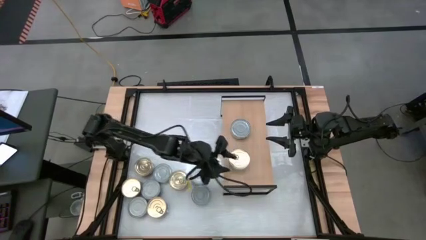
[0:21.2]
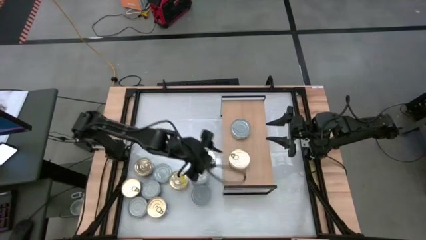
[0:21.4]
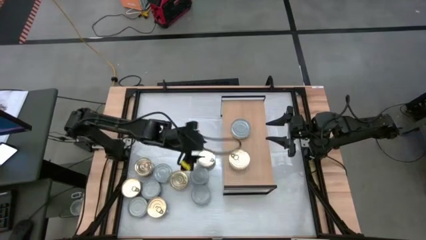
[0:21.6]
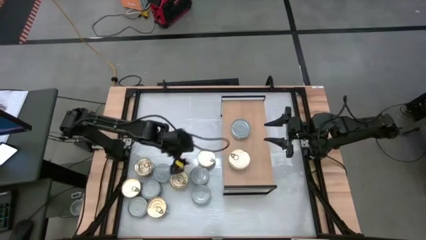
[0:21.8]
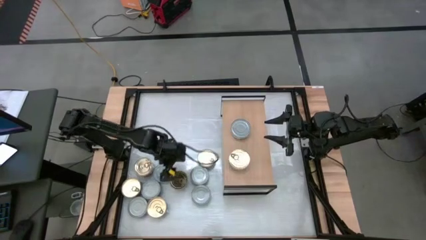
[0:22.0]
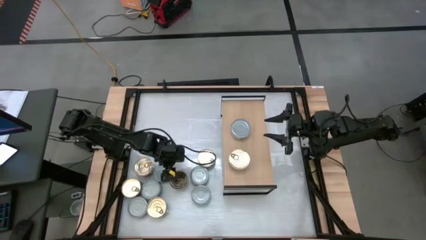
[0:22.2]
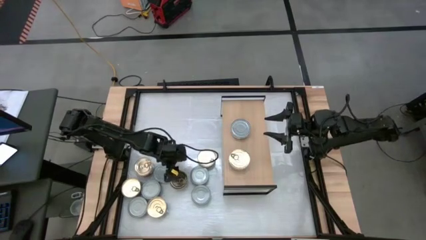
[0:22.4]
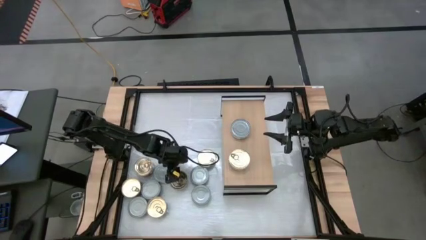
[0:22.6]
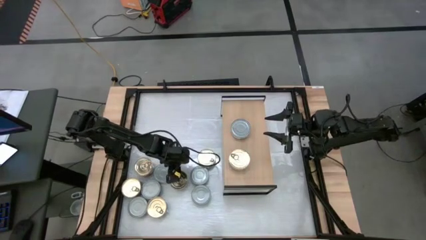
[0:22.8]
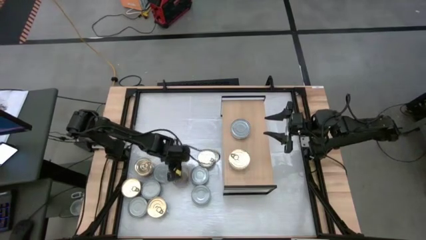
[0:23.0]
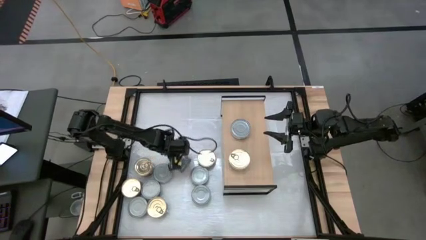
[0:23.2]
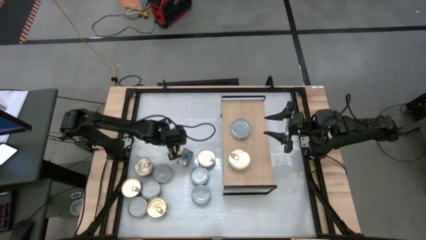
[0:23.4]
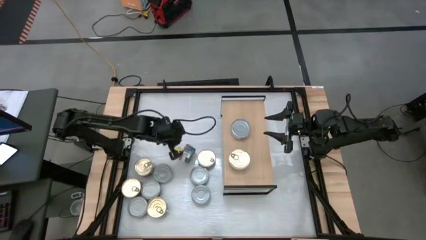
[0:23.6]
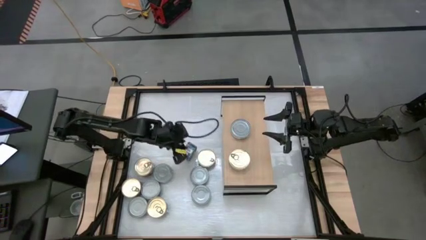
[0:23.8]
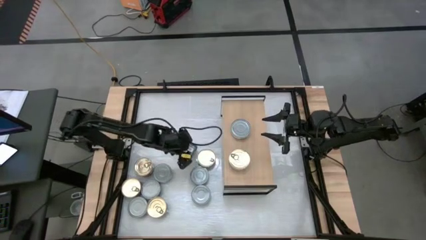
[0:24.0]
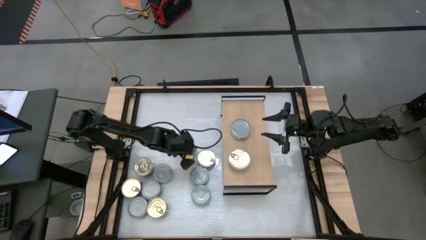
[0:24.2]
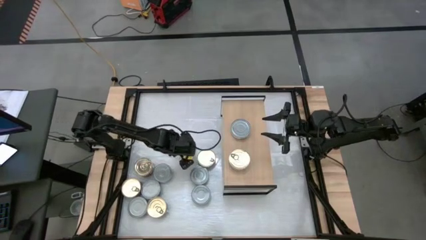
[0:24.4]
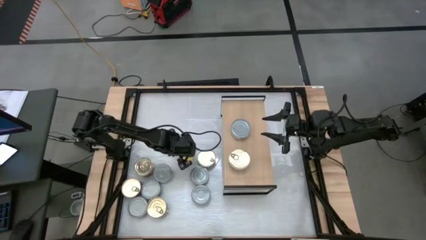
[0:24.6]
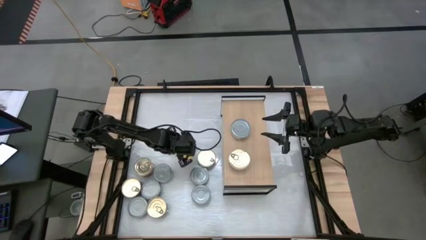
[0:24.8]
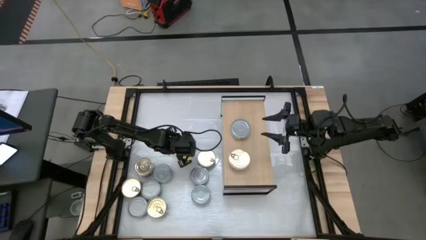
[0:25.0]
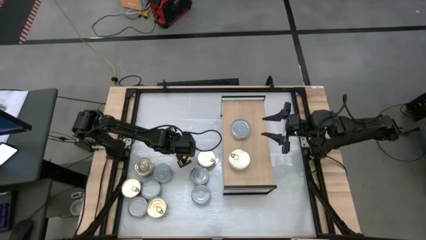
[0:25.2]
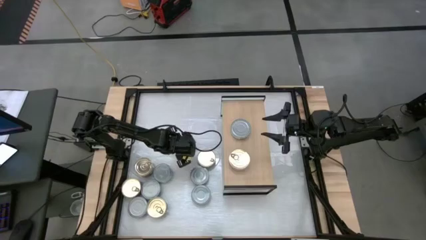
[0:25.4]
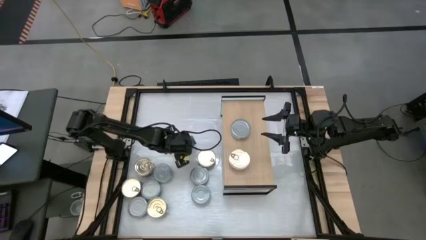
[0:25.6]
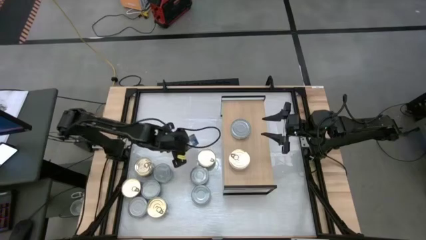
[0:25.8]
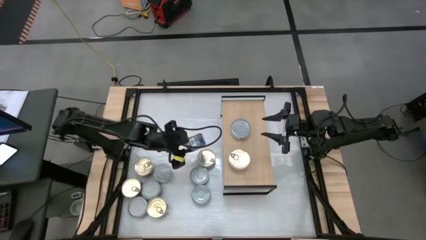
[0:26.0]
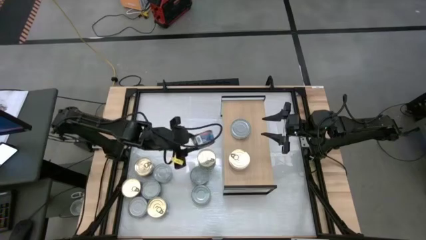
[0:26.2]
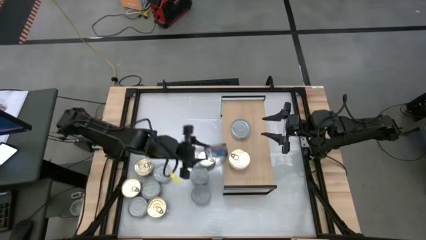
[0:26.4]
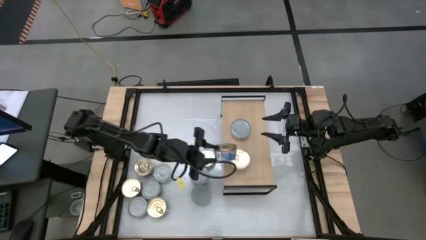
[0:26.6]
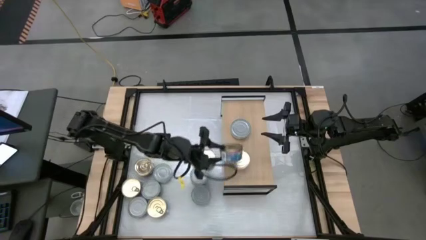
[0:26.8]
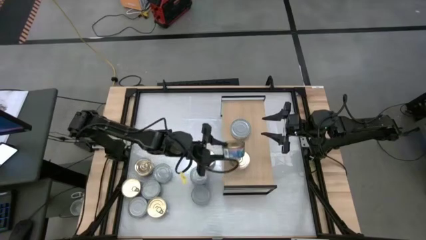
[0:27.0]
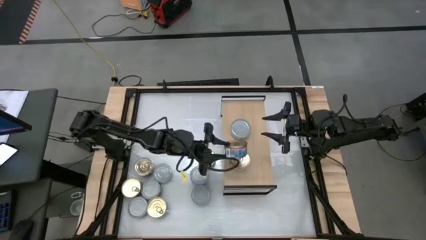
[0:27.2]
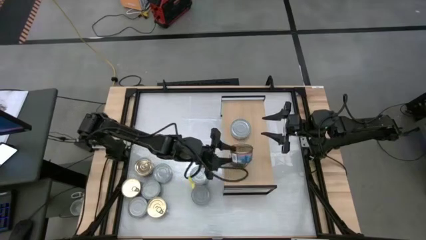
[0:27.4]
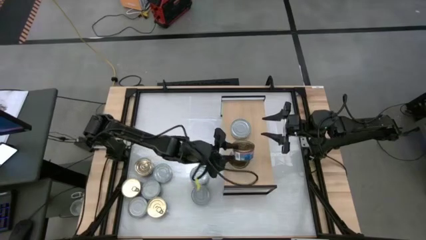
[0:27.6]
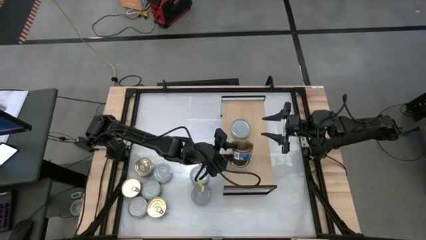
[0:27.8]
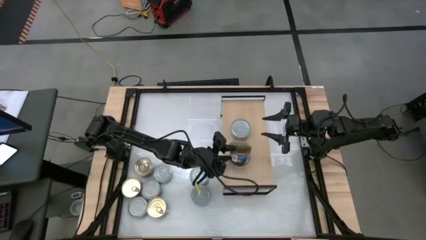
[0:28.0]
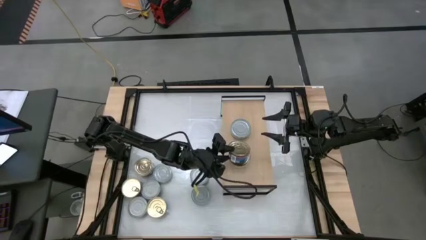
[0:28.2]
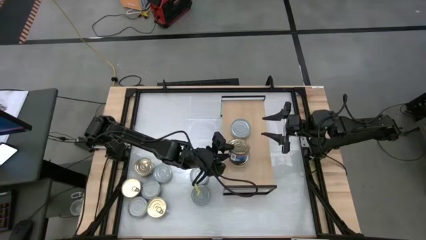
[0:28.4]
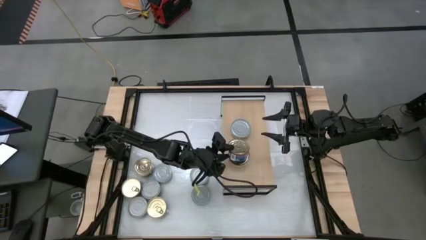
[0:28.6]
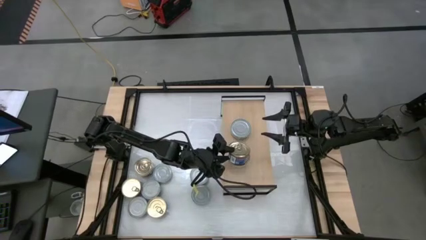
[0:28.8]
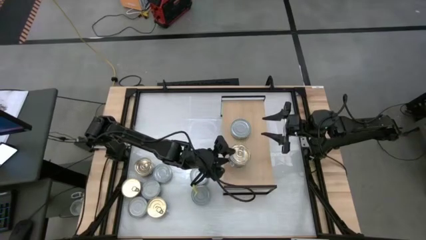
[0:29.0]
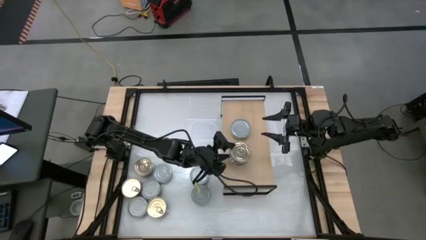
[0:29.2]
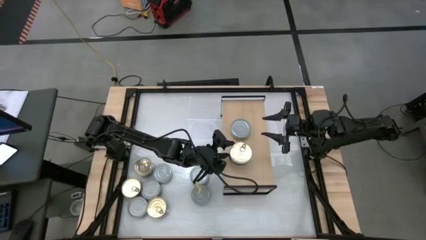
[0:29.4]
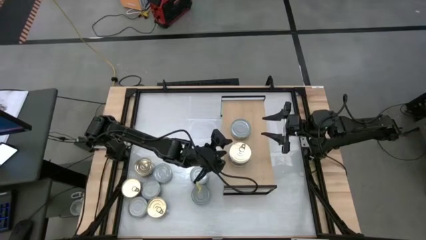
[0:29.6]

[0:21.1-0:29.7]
Task: Stack canned seafood by type on shelf
Stack the blue tuna can on top of the blue tuna can

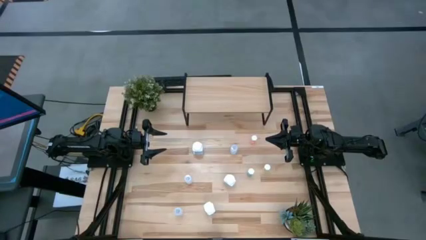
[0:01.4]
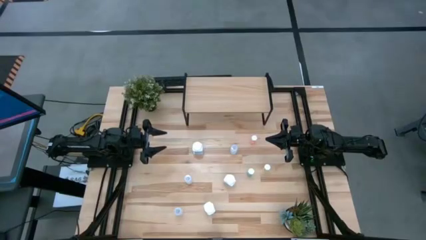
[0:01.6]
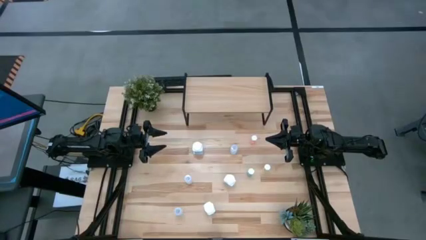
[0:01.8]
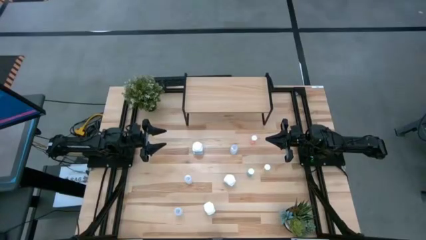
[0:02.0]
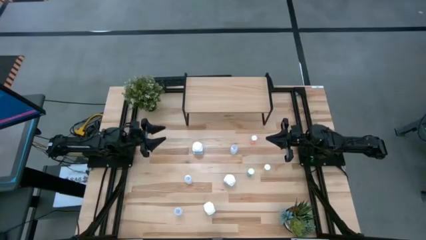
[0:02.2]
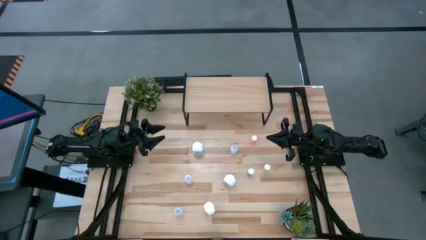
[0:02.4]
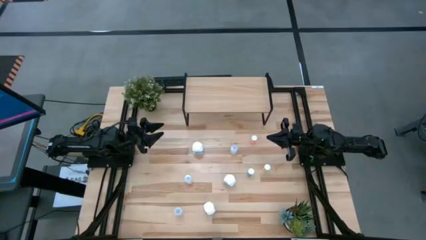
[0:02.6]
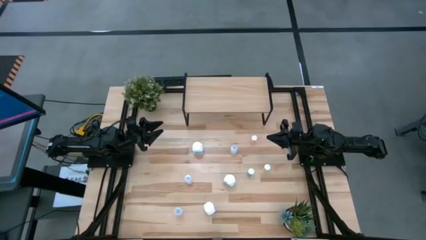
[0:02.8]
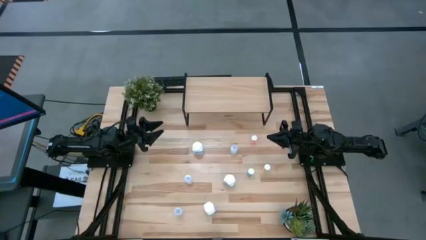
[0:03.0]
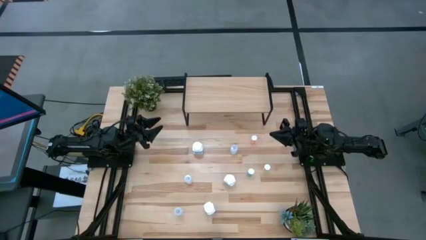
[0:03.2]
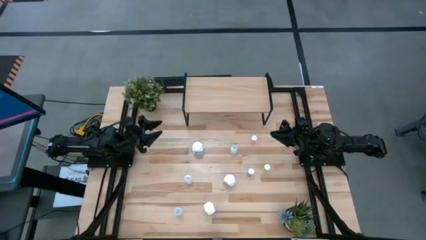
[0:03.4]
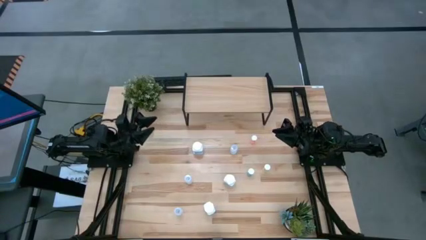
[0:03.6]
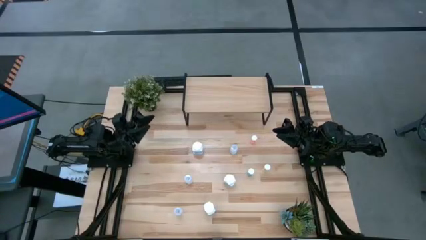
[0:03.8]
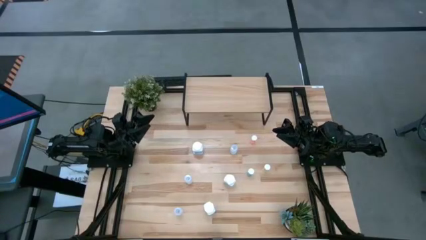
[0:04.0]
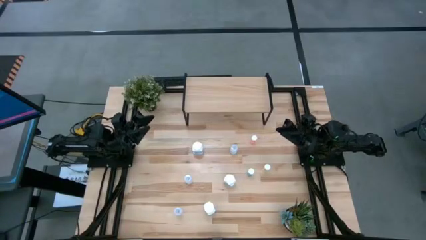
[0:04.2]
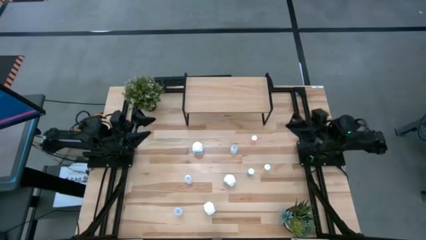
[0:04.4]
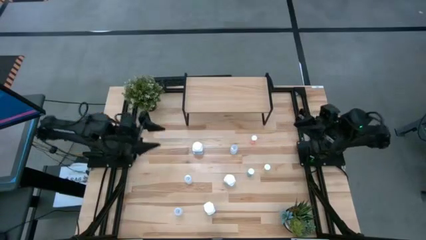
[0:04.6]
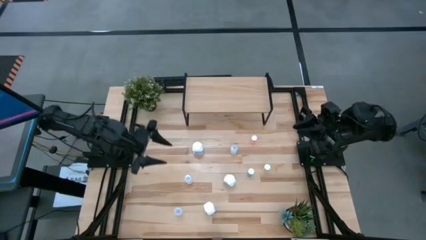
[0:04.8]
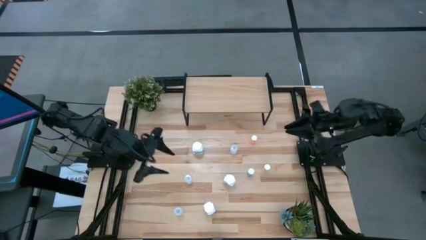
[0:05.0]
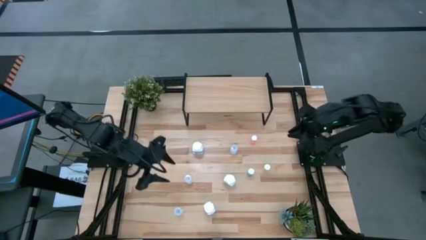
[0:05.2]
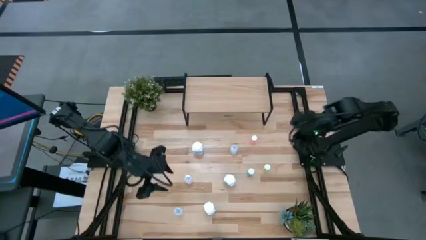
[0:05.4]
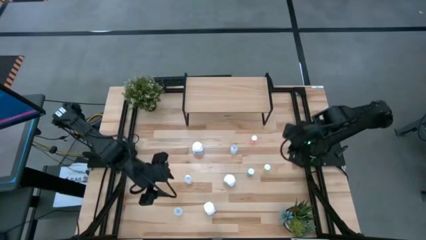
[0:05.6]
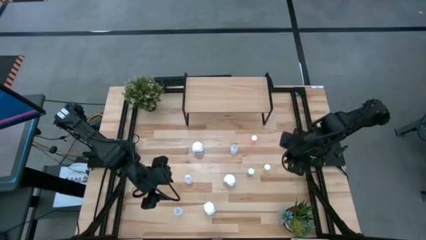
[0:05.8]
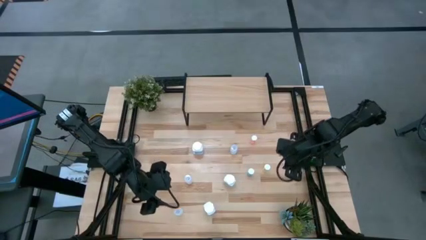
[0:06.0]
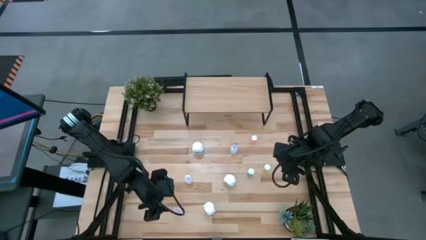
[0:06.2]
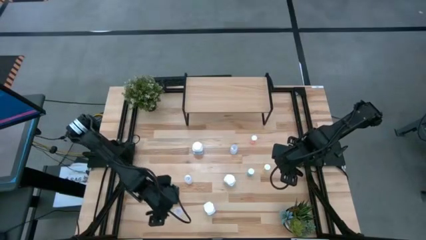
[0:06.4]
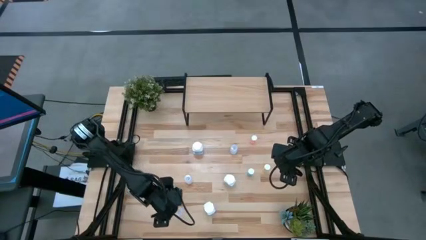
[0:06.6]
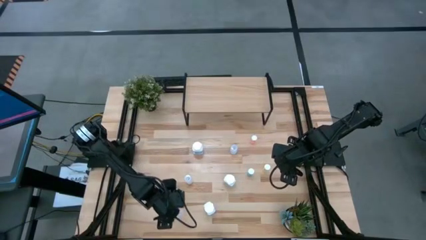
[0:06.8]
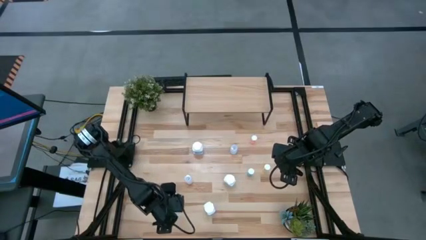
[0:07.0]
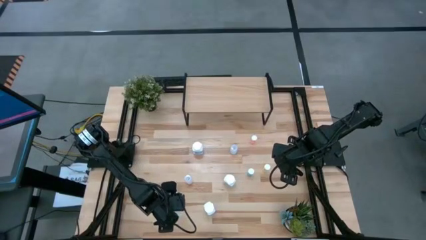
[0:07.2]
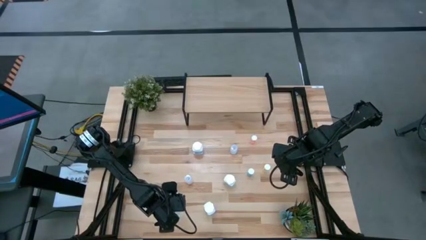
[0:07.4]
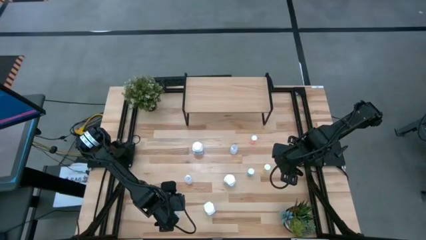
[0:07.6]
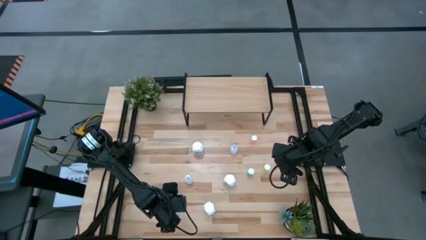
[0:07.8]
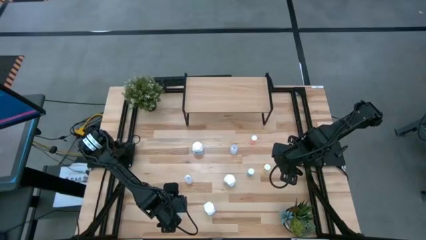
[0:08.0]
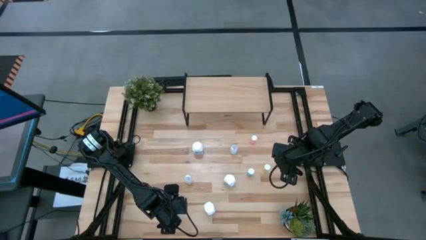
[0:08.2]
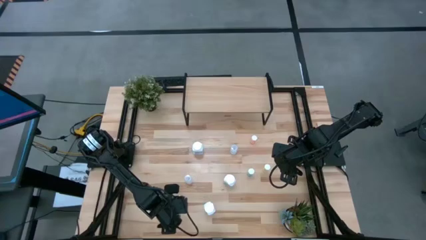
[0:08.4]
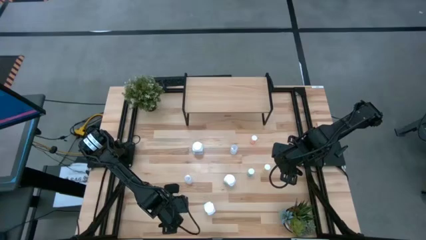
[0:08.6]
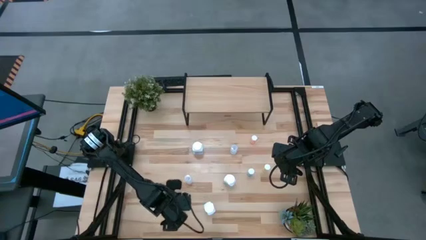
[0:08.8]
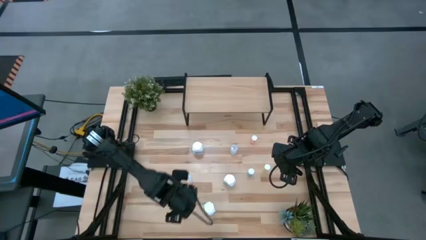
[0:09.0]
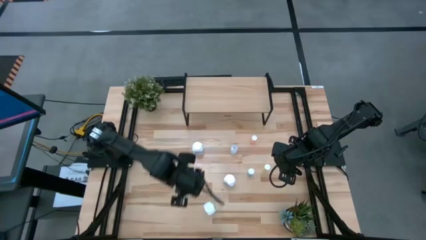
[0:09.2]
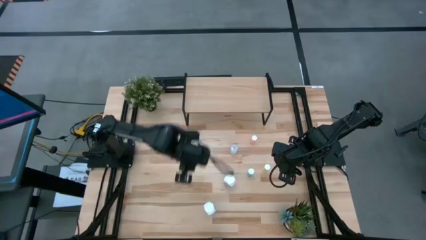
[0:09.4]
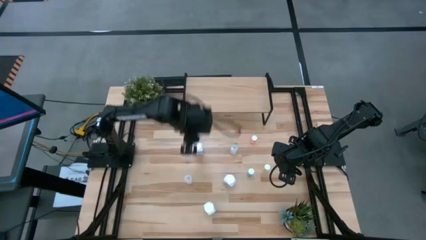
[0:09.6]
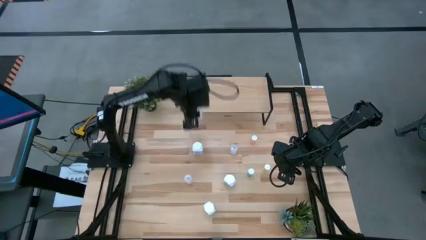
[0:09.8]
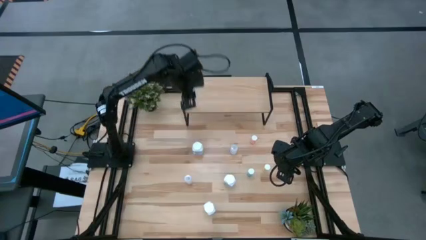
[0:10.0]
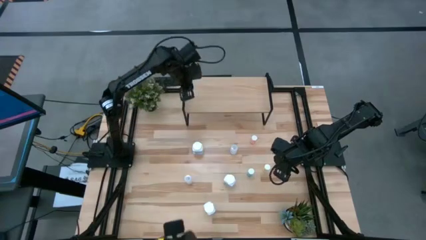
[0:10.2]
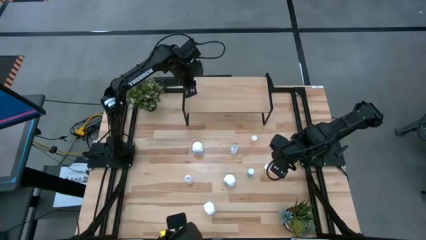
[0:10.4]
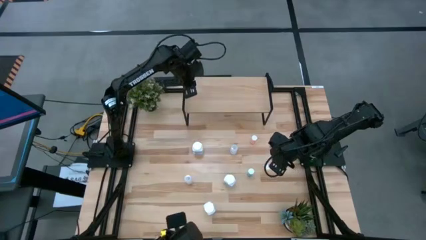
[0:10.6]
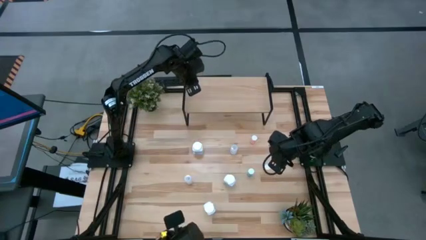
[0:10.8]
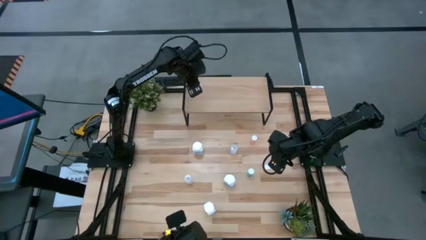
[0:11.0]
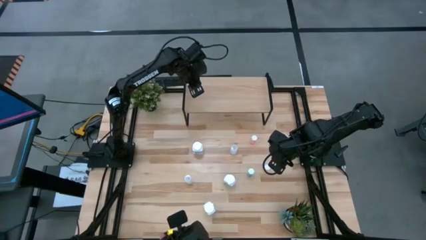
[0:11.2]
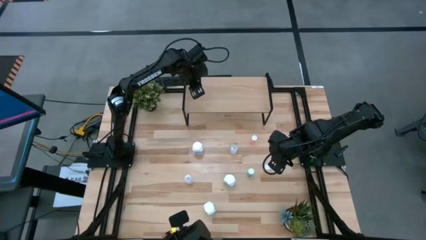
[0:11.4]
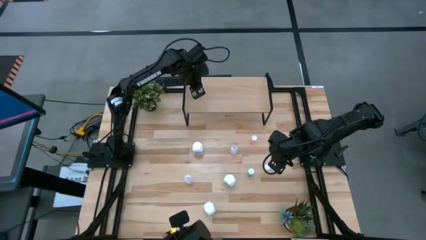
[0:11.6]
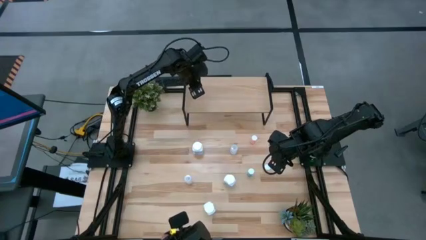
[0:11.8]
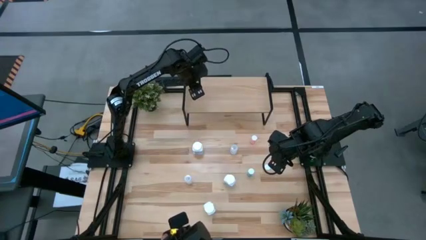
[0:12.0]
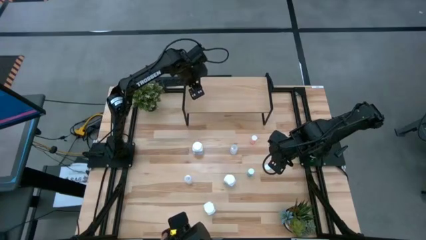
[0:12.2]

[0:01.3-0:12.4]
Task: Pick and place medicine bottles onto shelf by color
Put the bottom transparent pill bottle on the shelf
